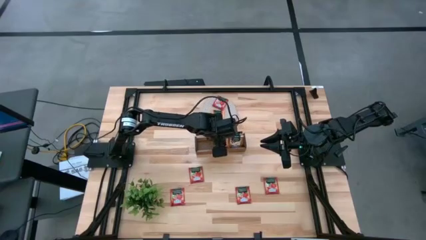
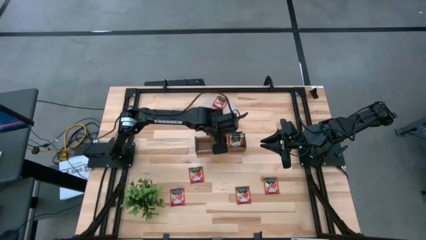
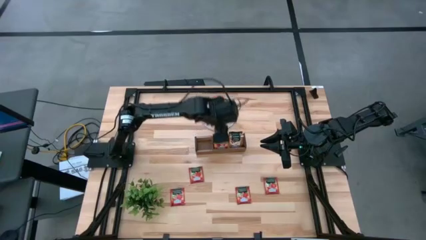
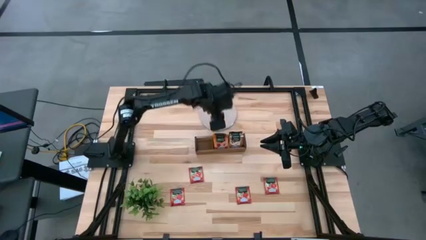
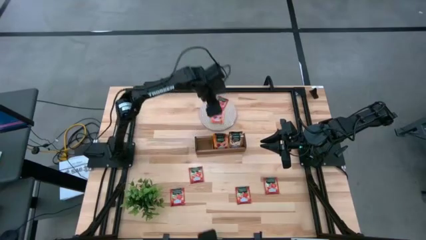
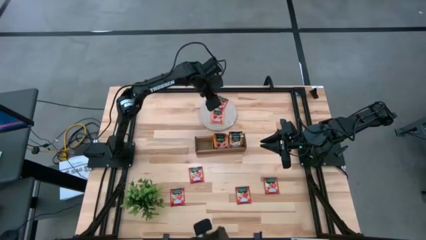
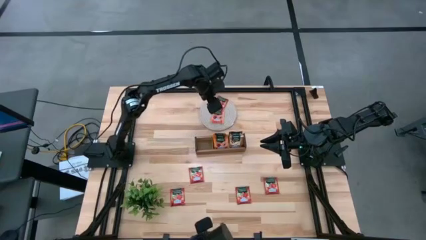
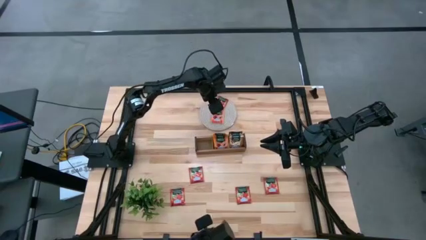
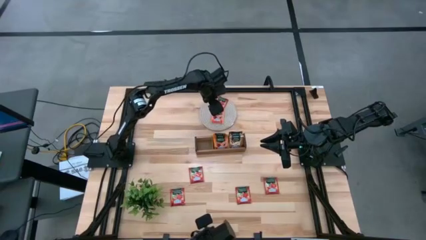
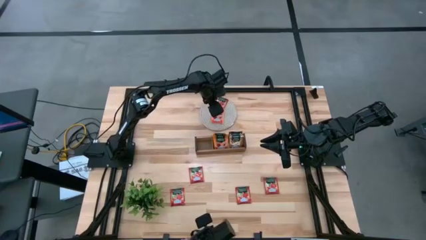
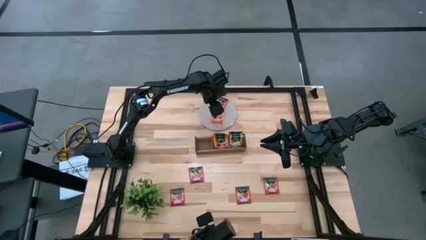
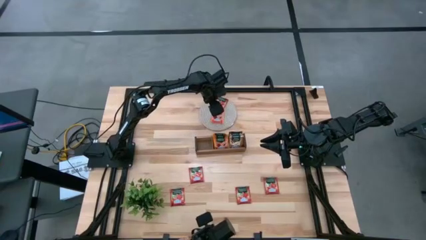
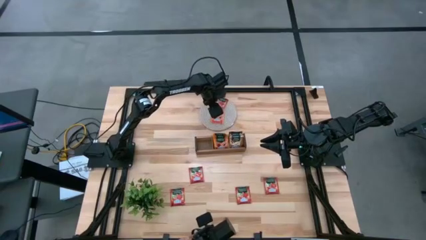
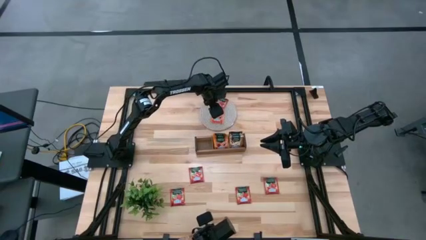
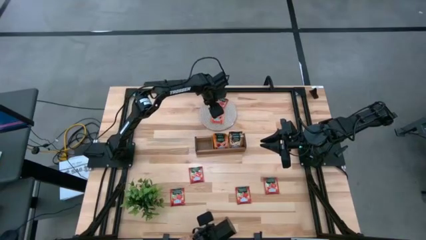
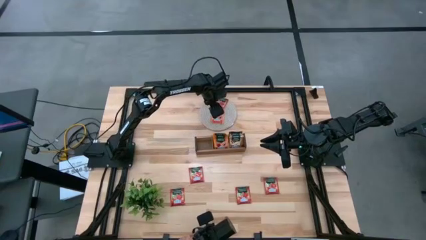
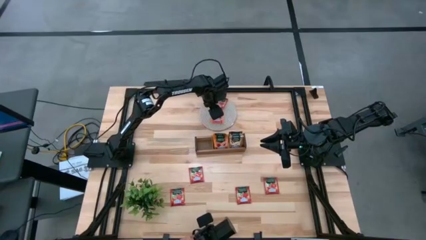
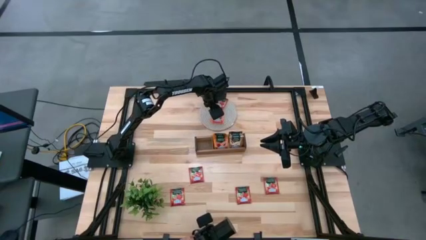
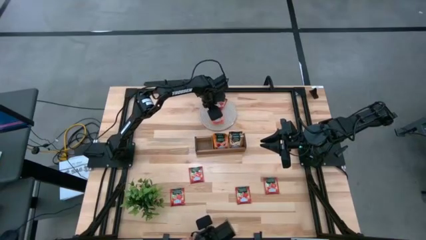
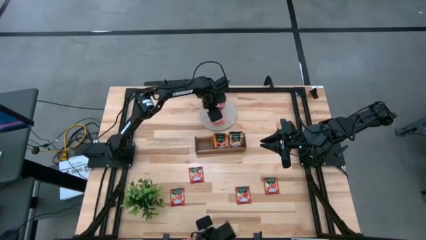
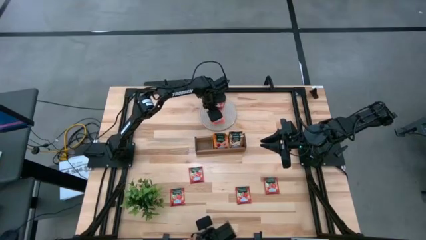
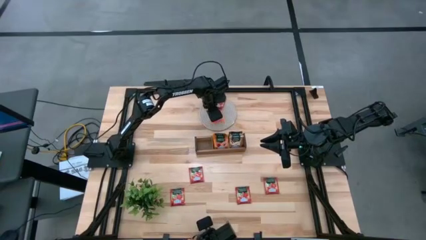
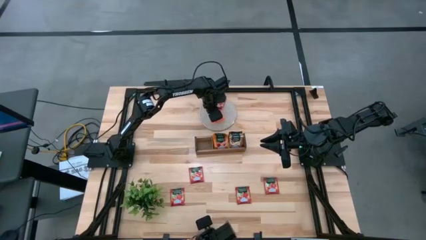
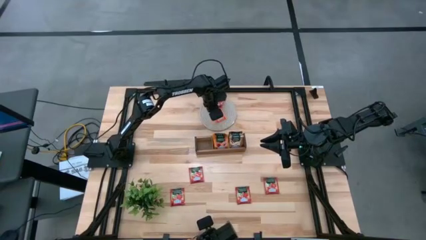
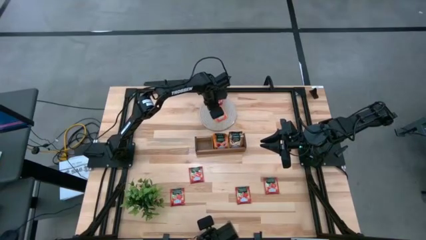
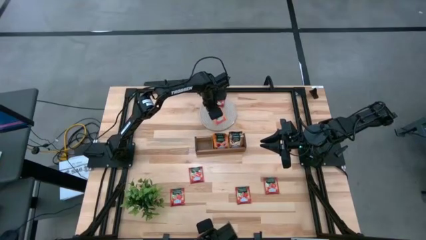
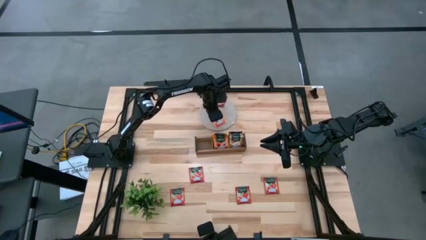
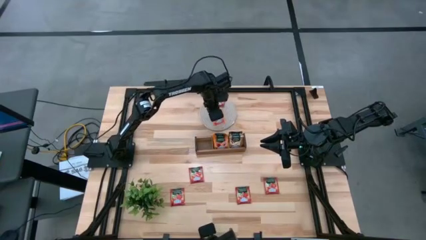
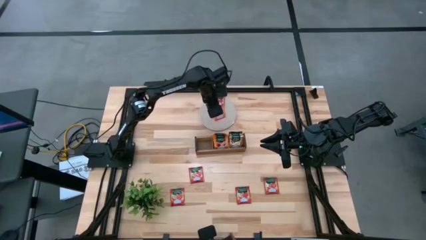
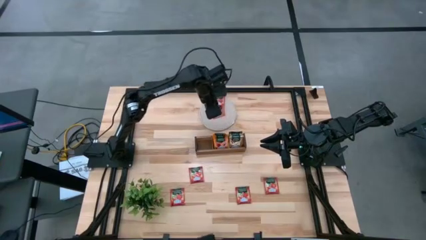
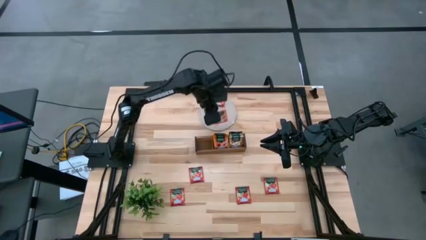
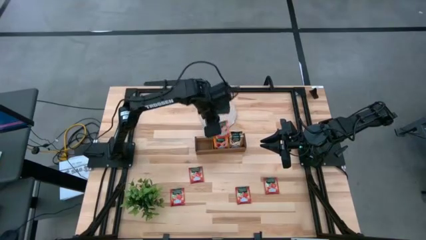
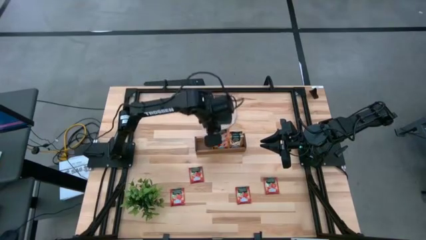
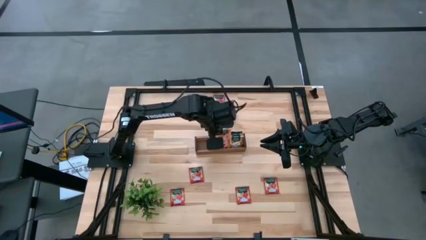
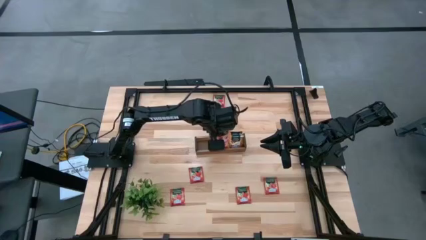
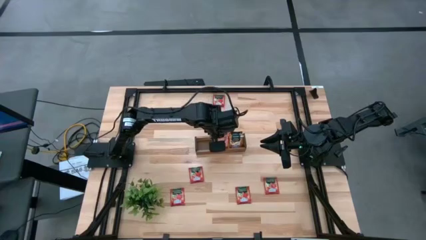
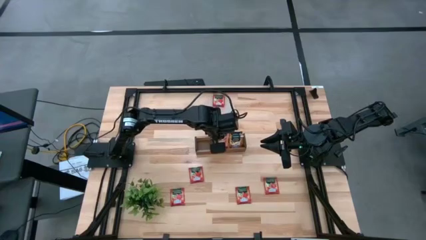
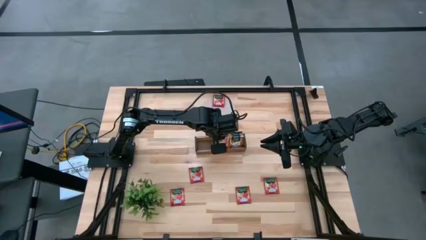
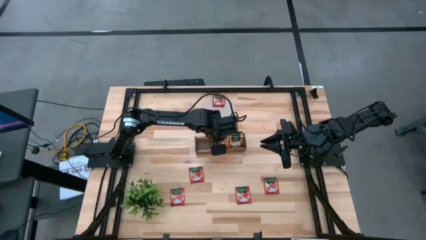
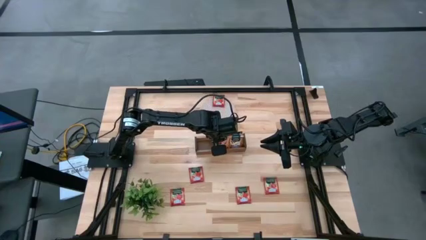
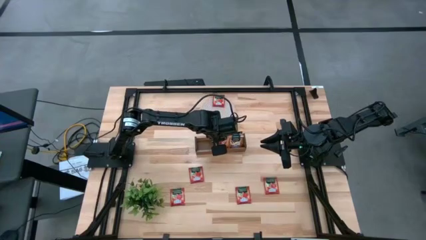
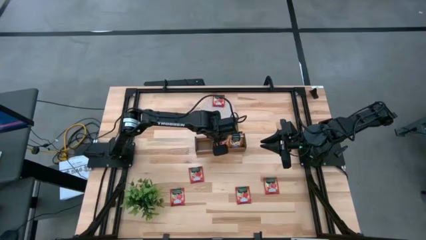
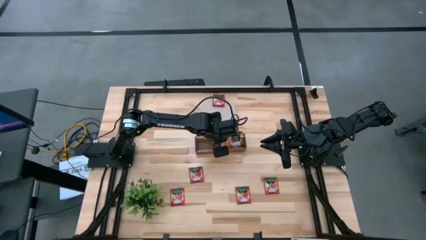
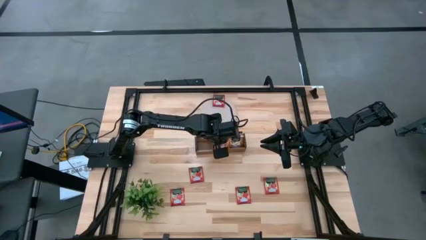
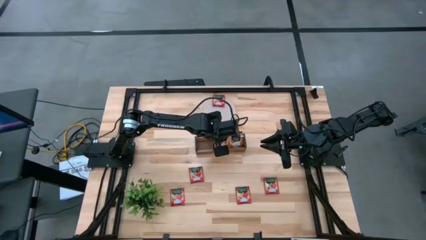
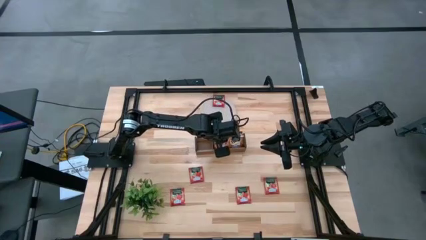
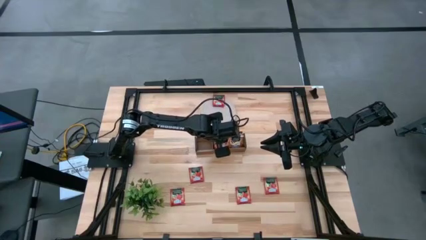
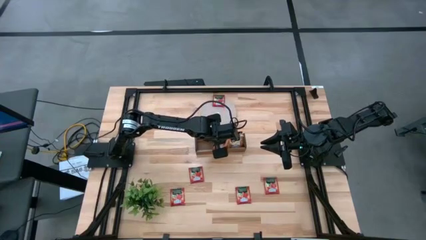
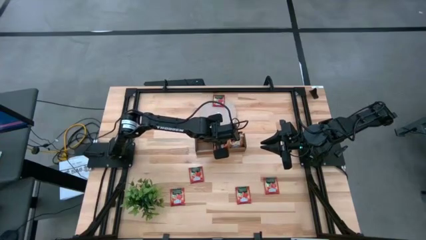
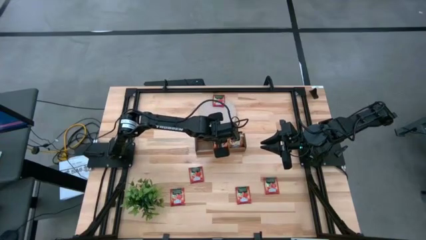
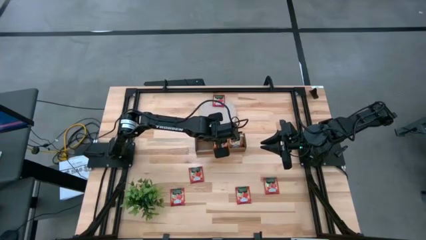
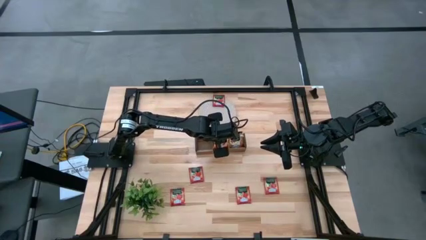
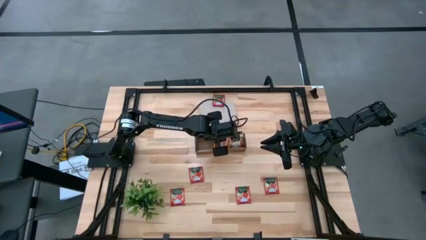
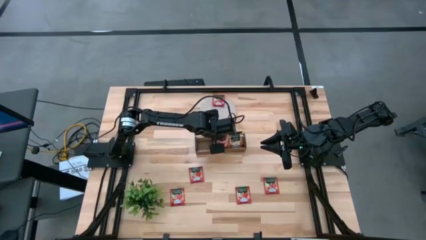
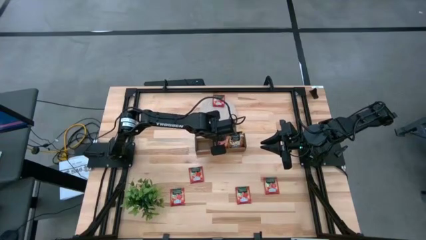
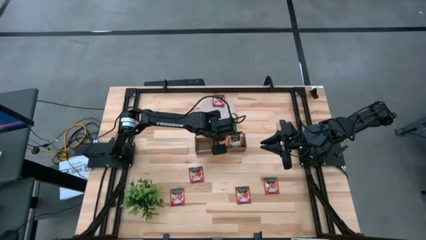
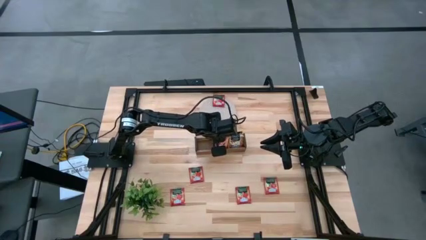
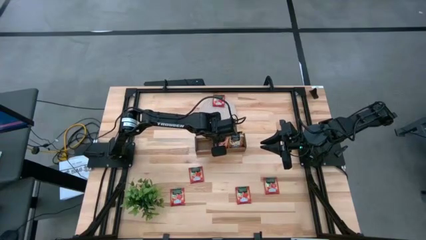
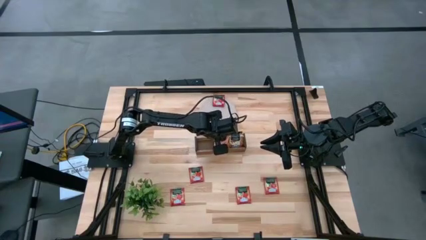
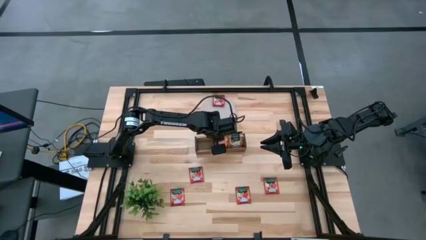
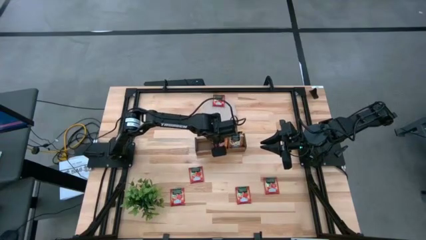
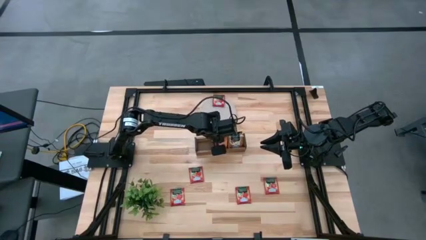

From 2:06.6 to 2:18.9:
Task: Pick & Place Tea
Put the orange tea bag into the middle section of the wooden organizer
